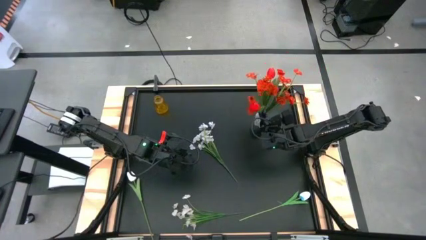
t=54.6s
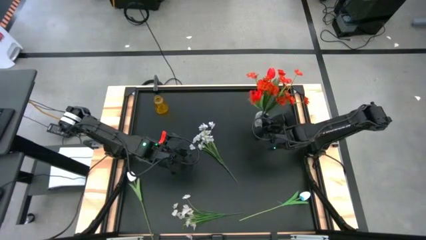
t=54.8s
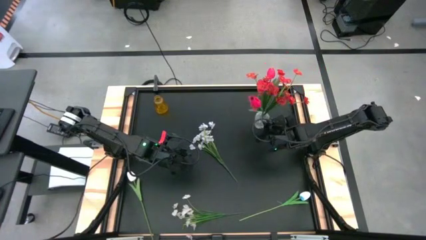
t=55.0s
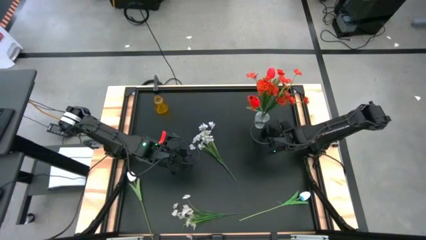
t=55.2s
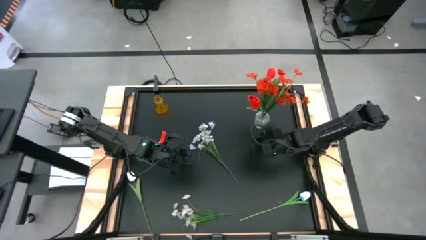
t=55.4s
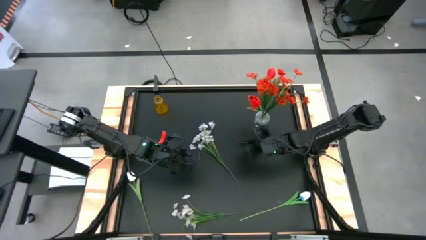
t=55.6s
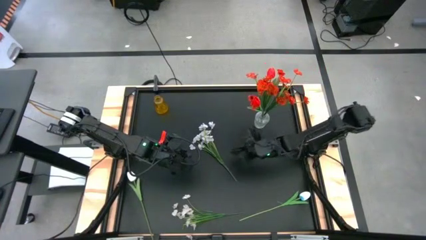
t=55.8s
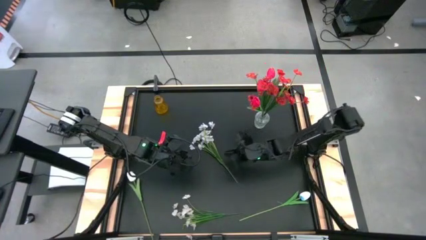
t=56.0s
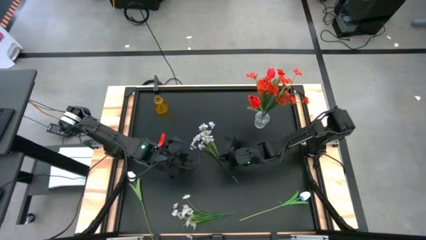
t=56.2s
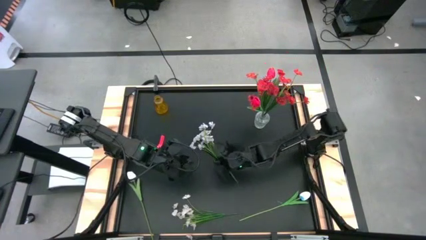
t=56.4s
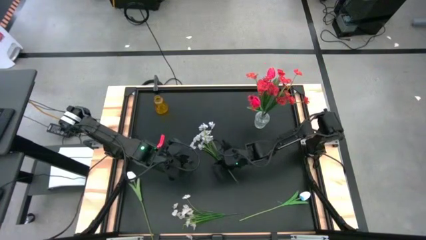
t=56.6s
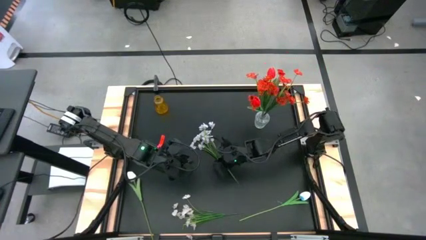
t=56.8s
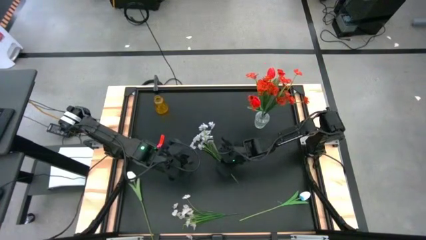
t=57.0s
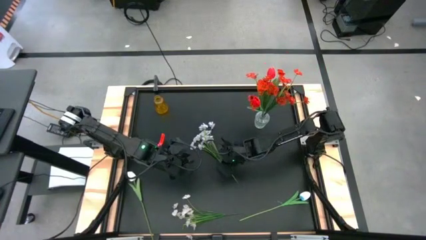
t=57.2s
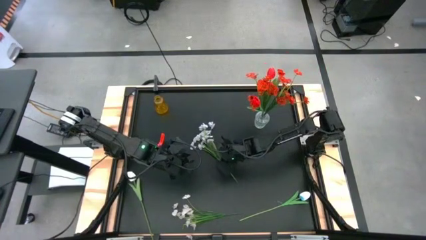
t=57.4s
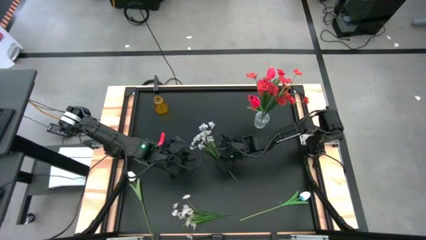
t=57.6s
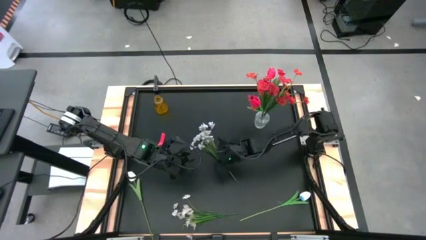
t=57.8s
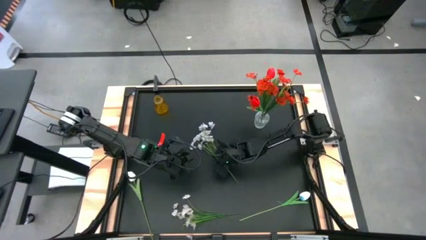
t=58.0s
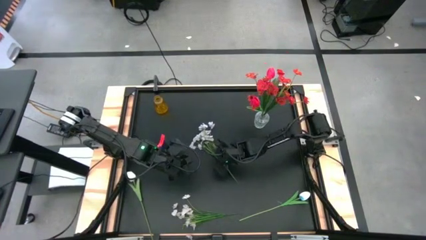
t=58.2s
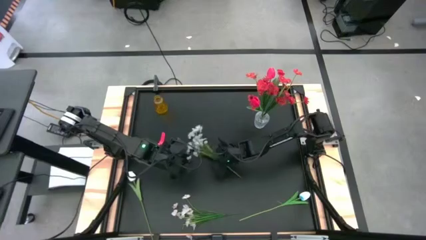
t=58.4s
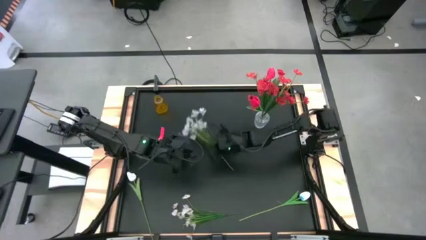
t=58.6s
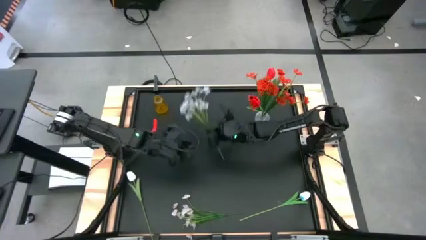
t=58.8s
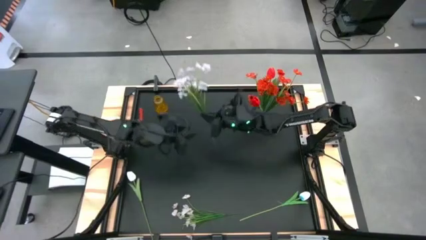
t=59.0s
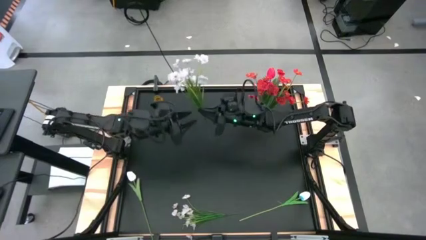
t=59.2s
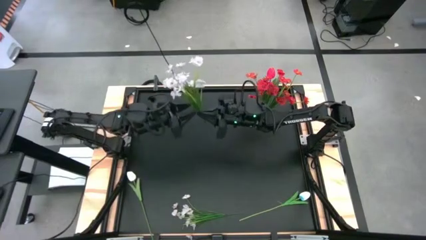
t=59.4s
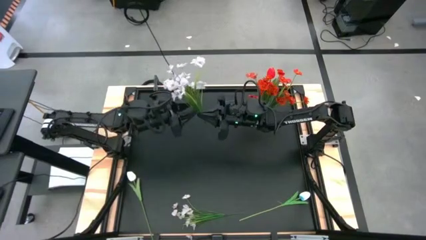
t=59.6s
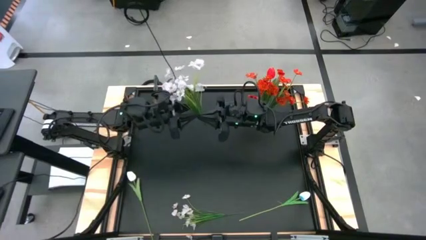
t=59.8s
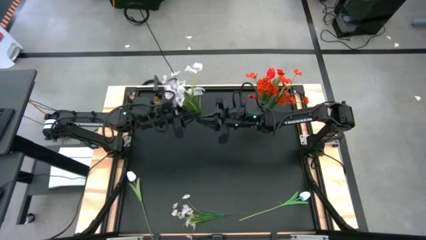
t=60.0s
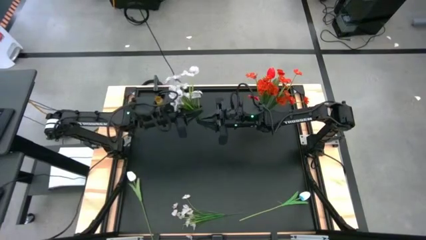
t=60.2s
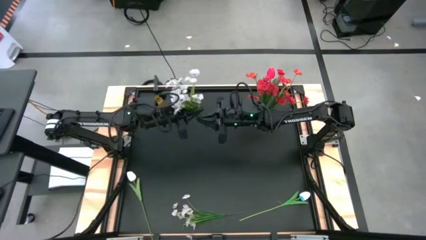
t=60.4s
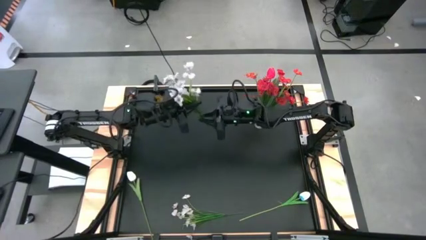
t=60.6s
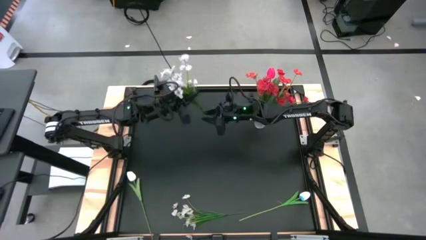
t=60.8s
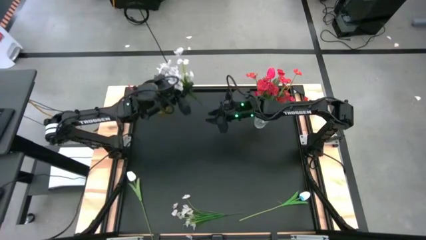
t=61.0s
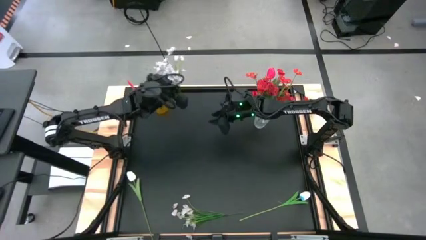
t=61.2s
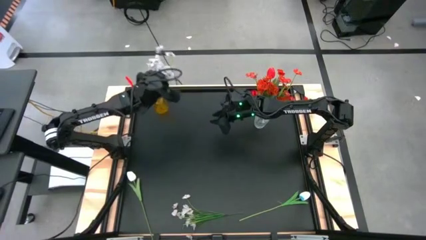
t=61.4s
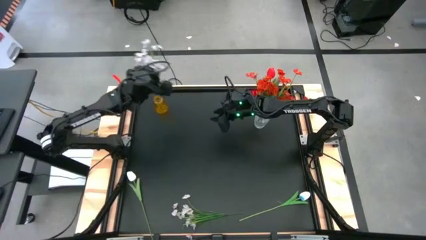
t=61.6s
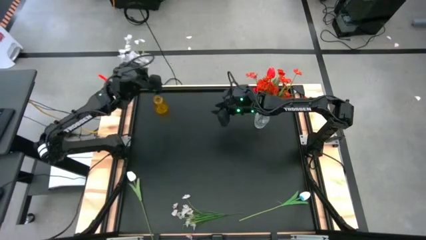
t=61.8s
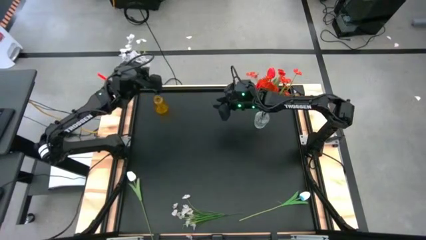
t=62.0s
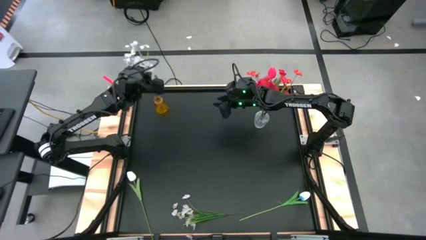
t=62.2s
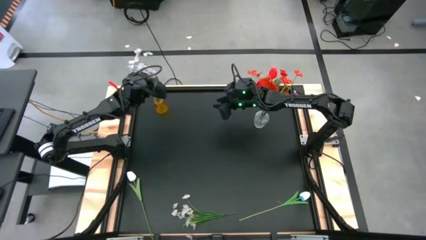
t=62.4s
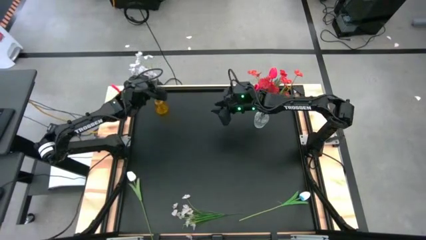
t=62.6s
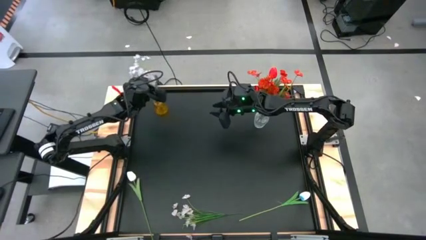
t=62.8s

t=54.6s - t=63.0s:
Task: Sort flowers into vase by color
Put the top white flower into the yellow vase

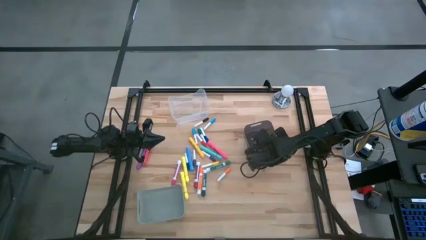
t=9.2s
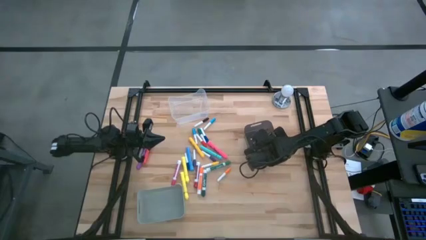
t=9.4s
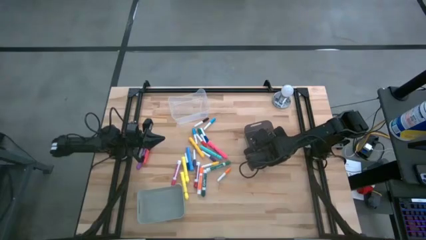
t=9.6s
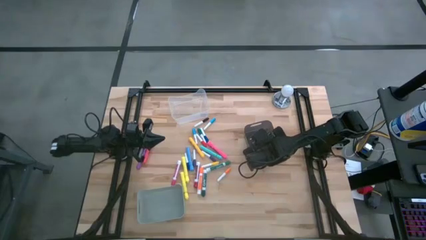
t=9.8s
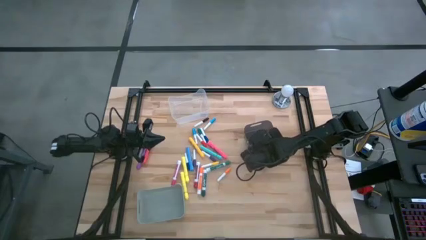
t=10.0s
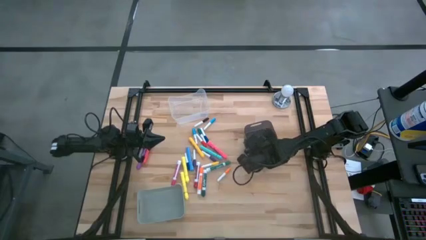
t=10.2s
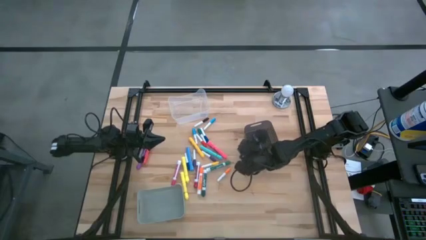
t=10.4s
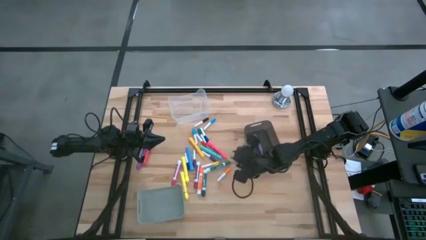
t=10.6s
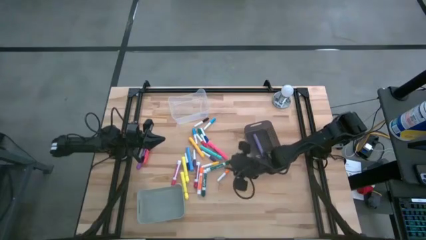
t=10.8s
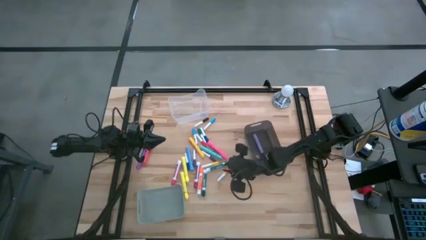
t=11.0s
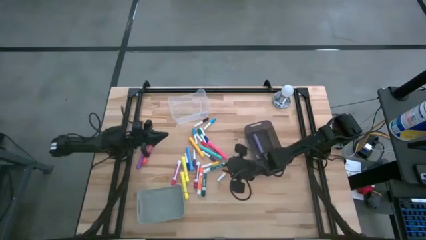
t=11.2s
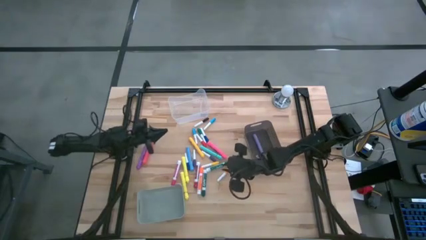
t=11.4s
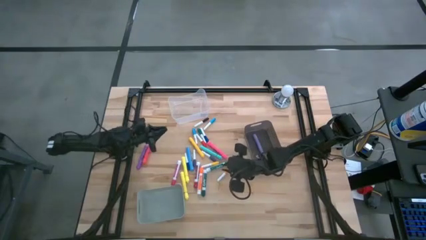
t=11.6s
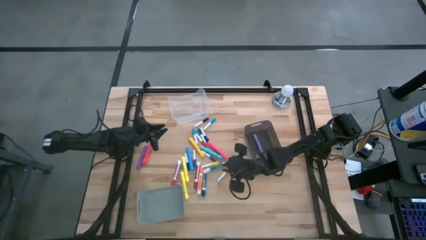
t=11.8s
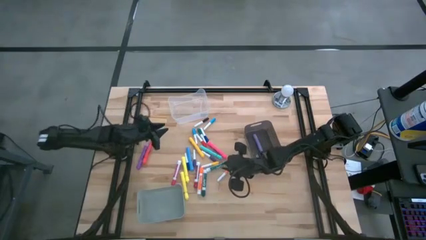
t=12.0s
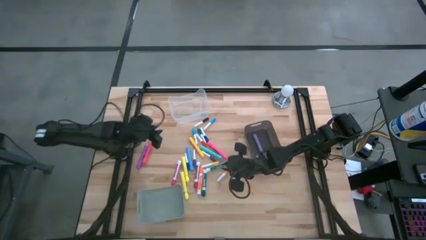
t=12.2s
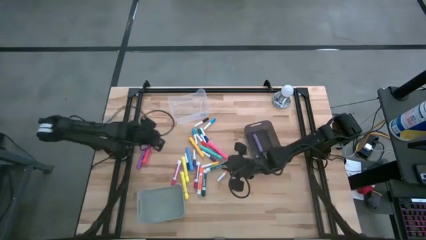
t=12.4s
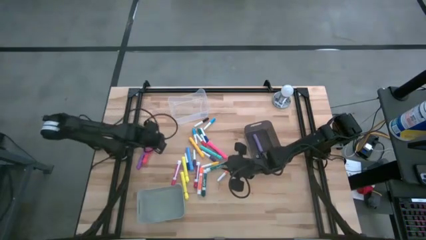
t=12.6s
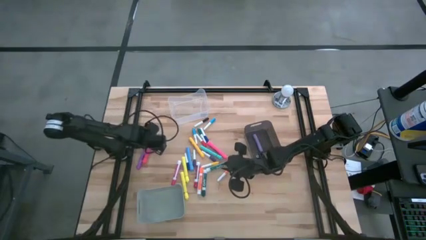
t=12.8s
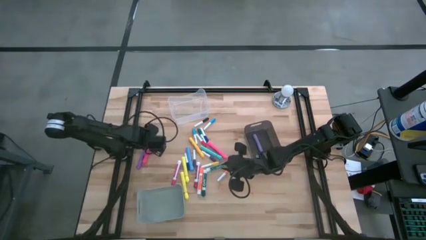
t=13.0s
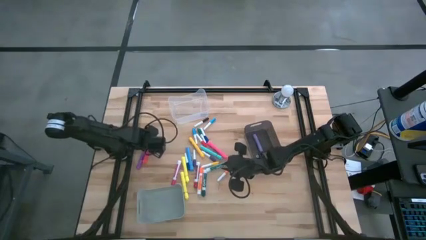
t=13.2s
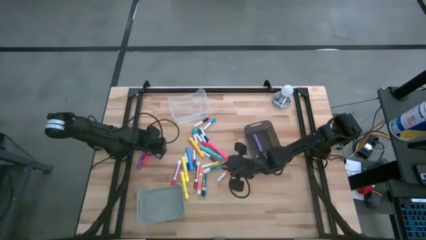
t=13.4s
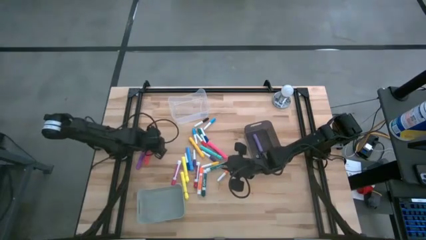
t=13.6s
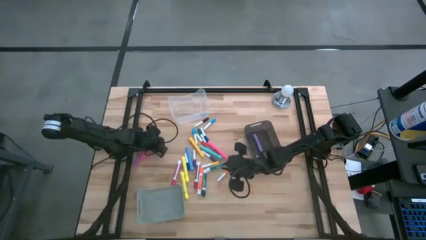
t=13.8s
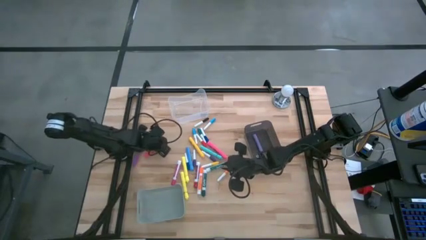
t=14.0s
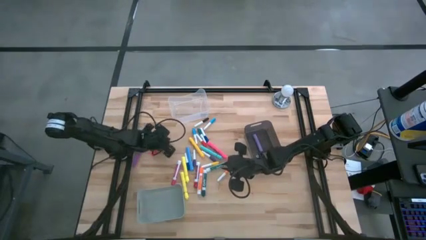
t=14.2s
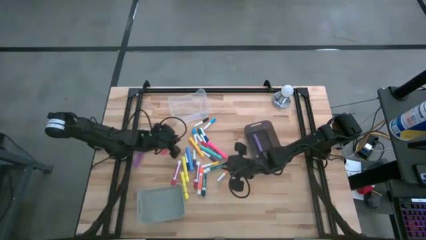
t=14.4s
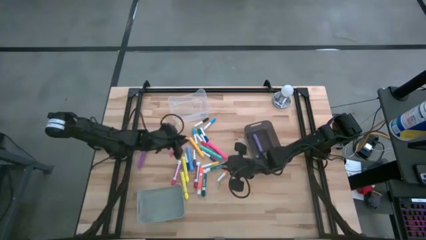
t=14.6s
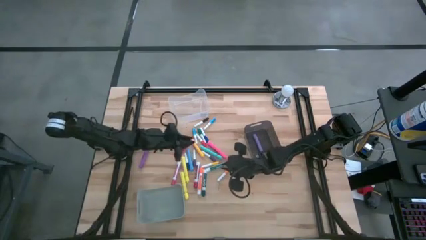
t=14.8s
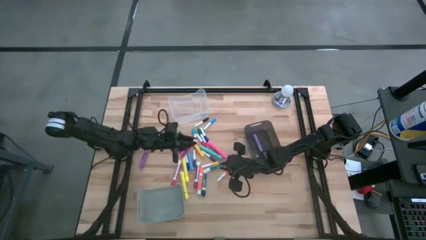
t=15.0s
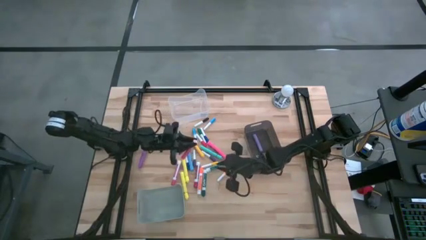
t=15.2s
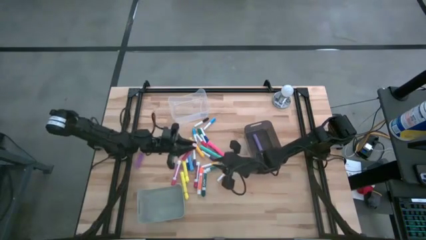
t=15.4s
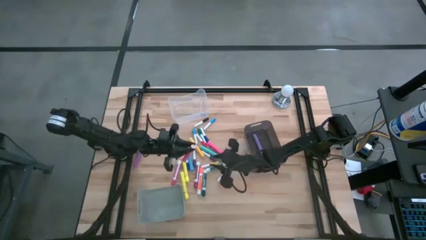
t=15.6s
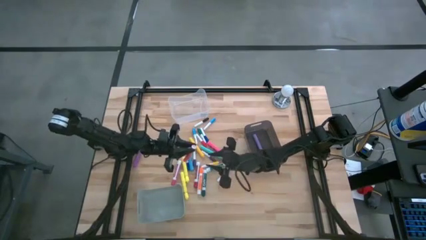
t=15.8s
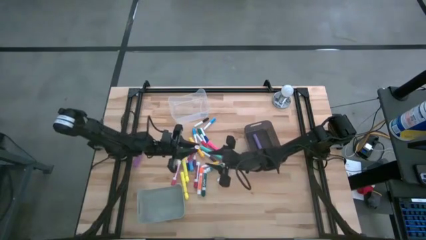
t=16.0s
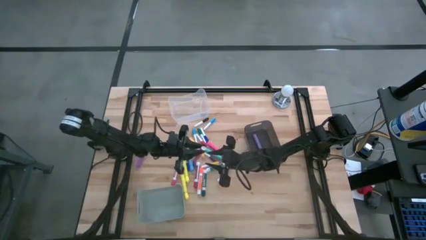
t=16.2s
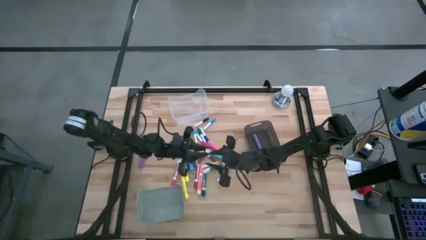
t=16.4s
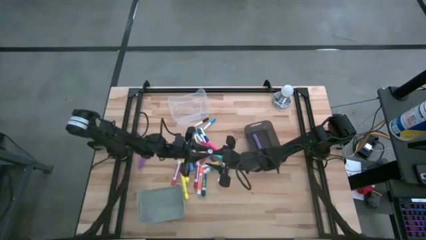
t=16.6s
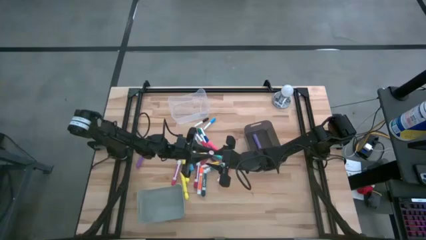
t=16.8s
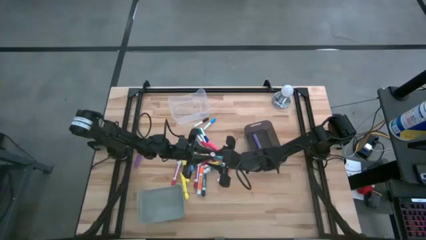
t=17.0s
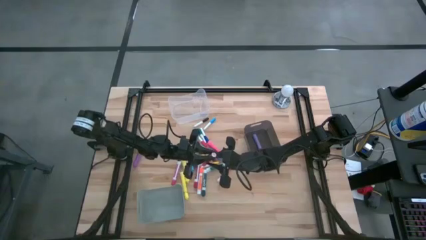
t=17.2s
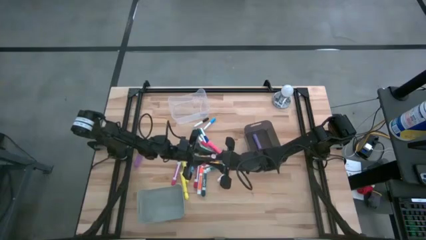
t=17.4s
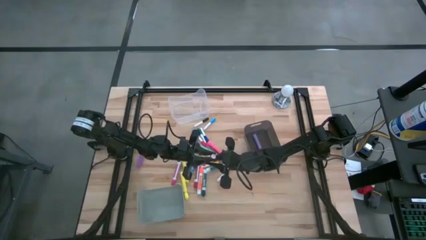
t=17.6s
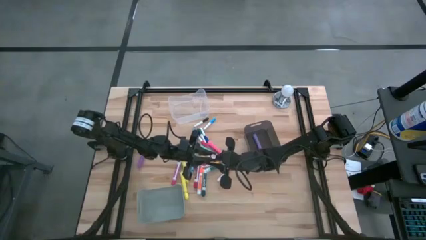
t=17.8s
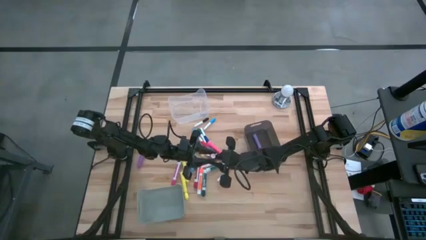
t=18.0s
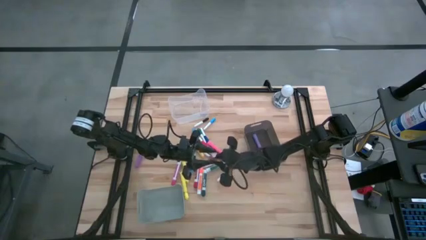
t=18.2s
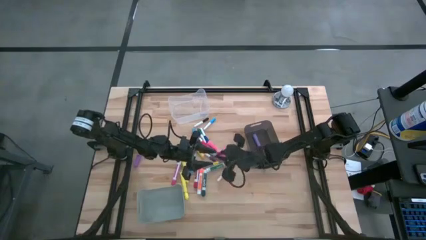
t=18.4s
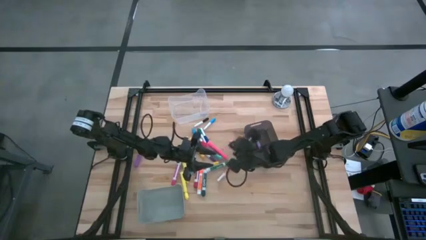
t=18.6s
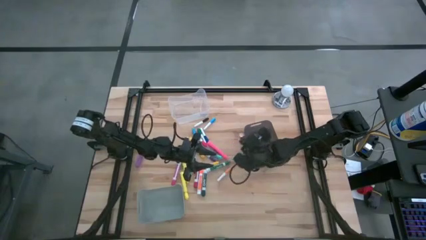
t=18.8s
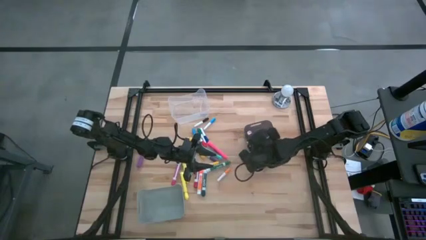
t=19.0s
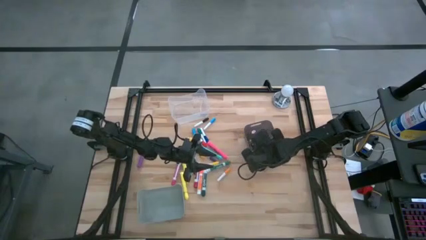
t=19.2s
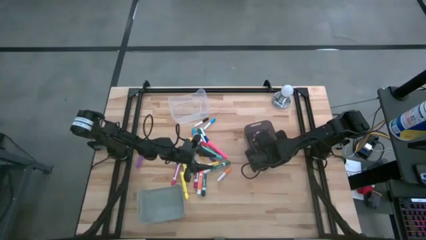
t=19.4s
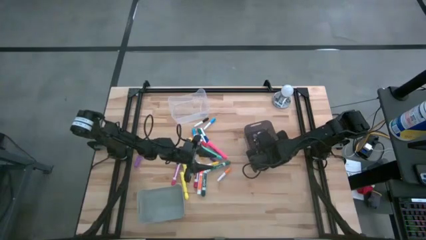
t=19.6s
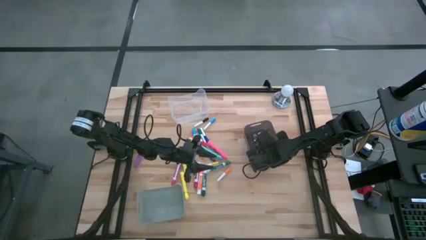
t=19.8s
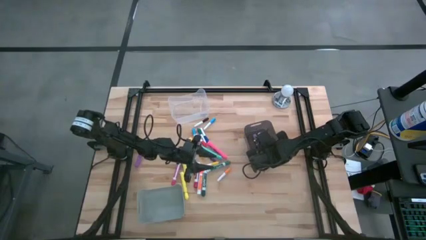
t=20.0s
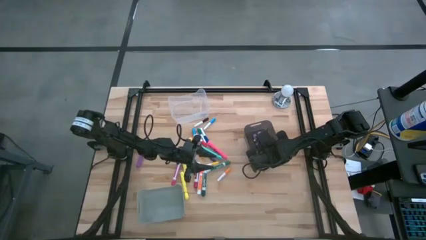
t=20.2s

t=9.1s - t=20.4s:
Task: Pick & Place Markers
Put the red highlighter pen into the black bin
